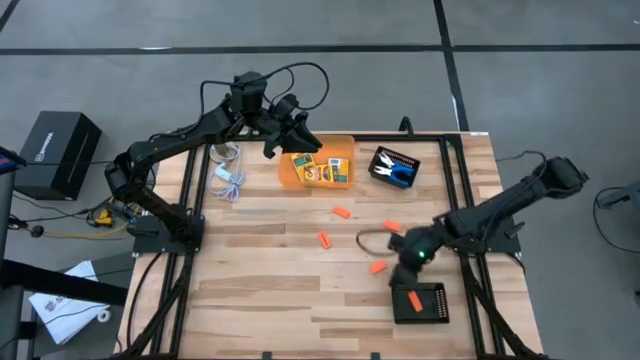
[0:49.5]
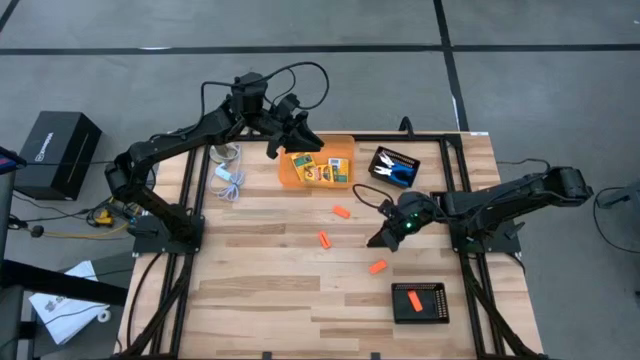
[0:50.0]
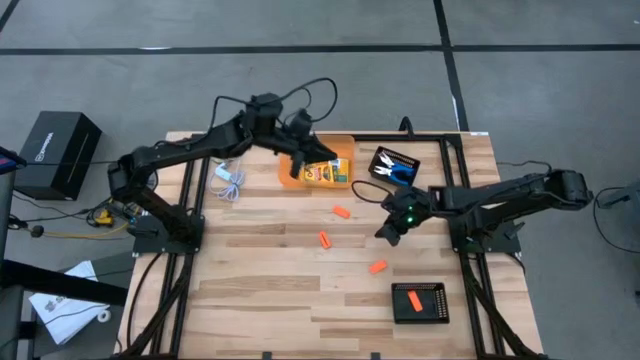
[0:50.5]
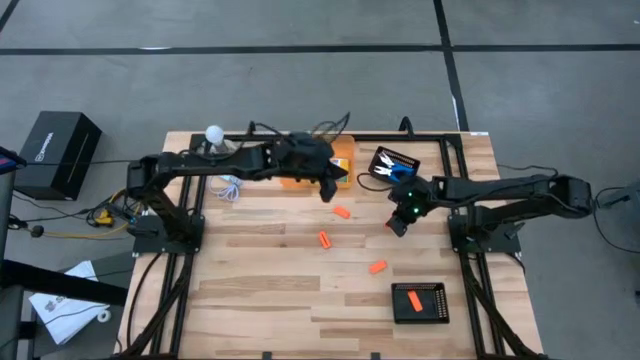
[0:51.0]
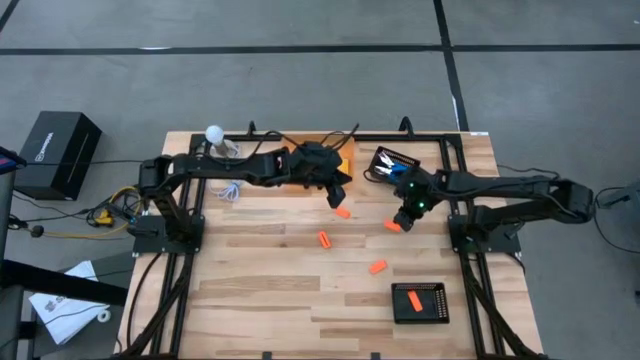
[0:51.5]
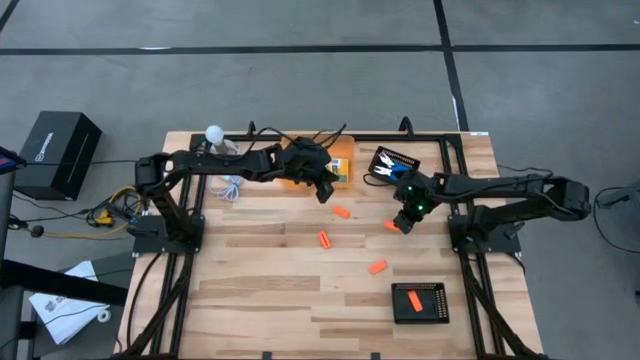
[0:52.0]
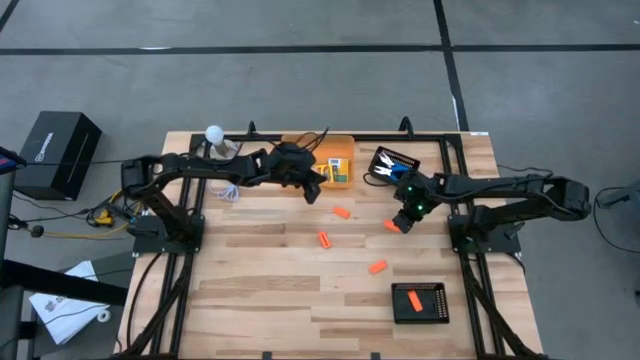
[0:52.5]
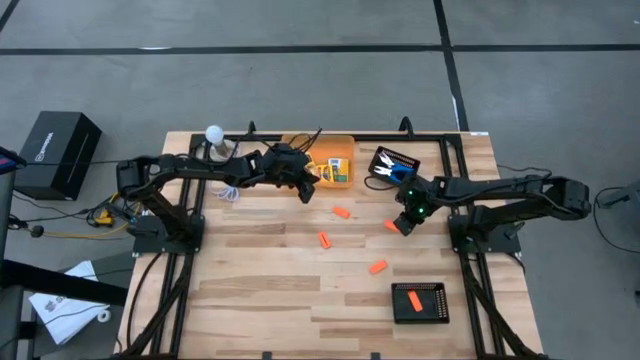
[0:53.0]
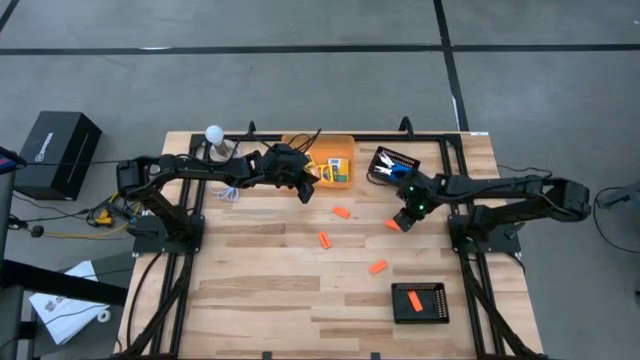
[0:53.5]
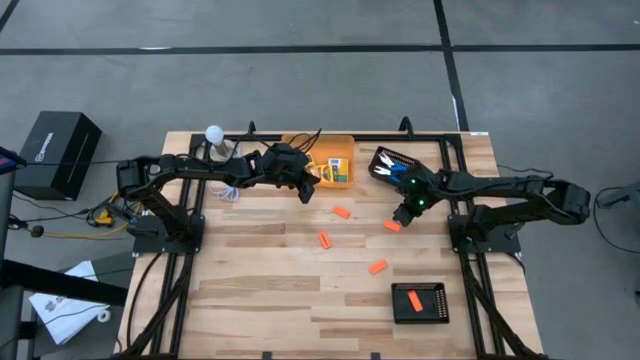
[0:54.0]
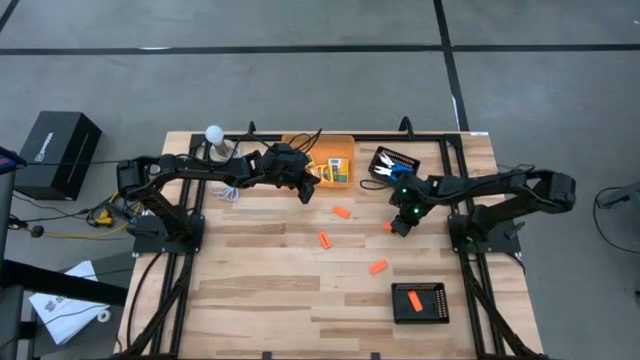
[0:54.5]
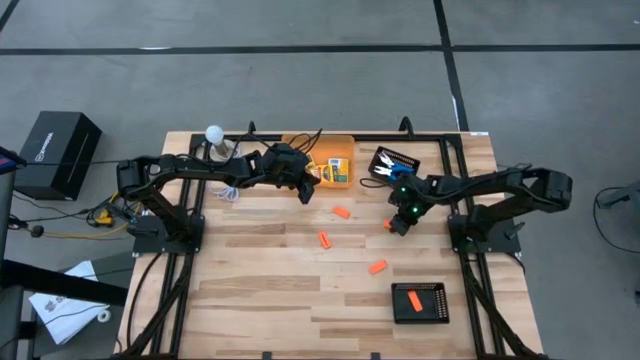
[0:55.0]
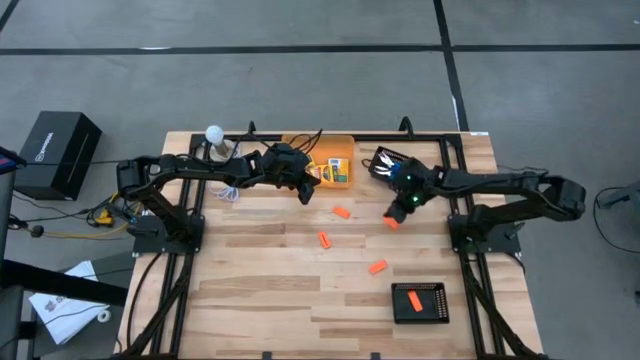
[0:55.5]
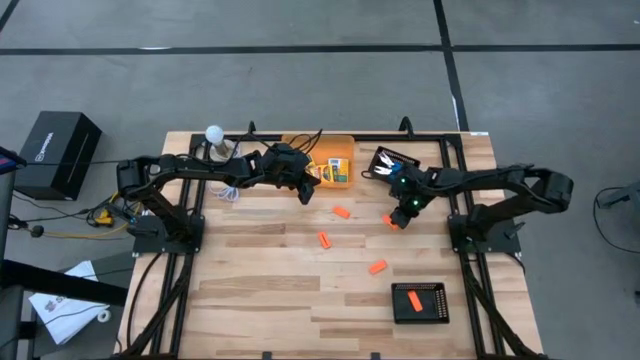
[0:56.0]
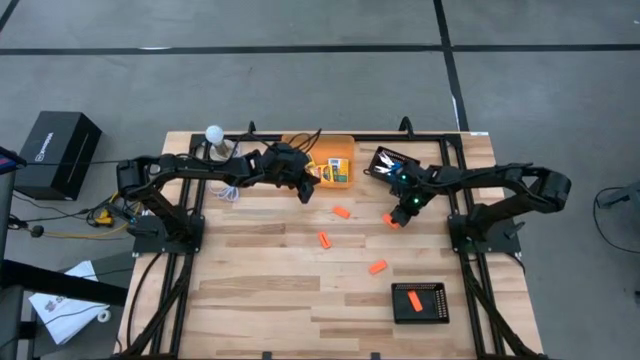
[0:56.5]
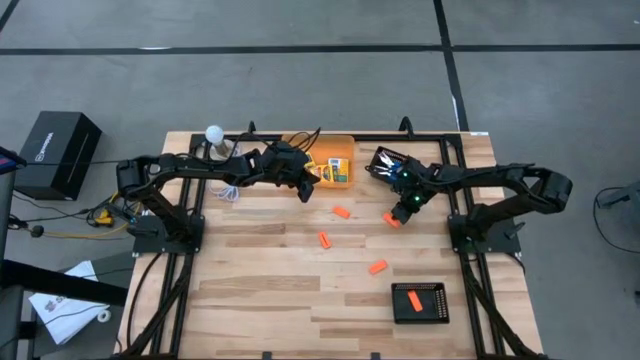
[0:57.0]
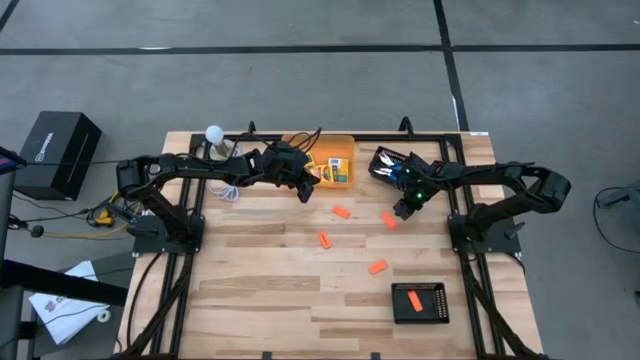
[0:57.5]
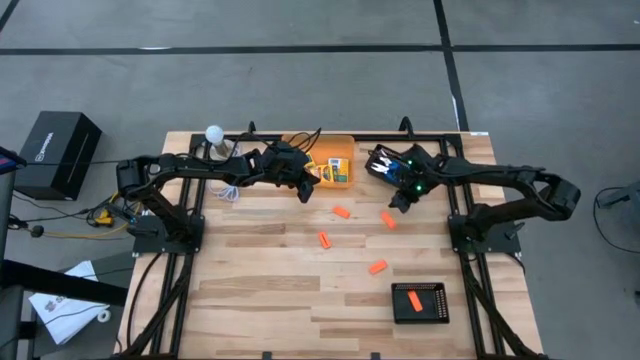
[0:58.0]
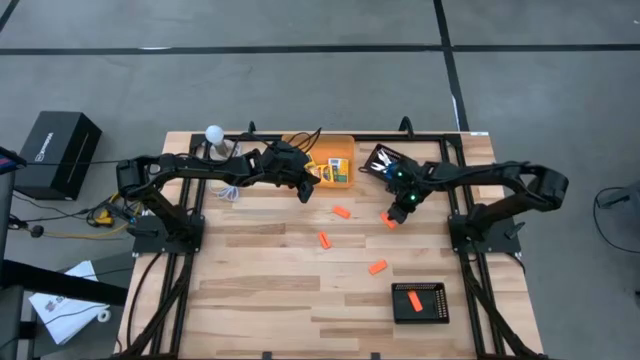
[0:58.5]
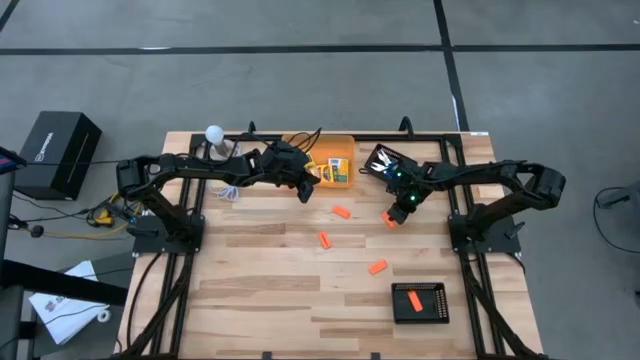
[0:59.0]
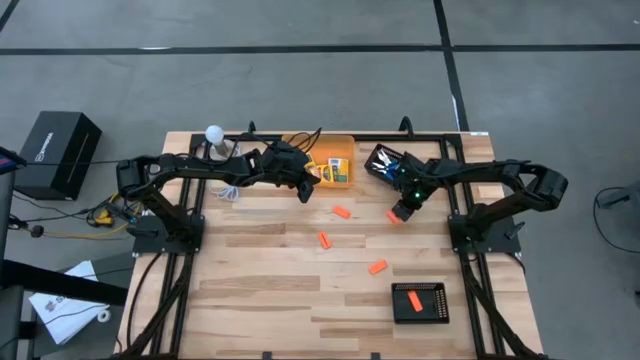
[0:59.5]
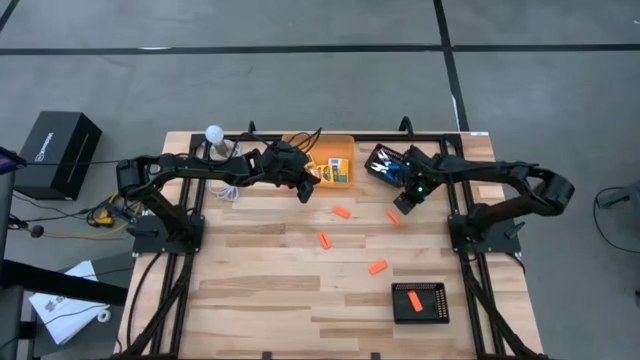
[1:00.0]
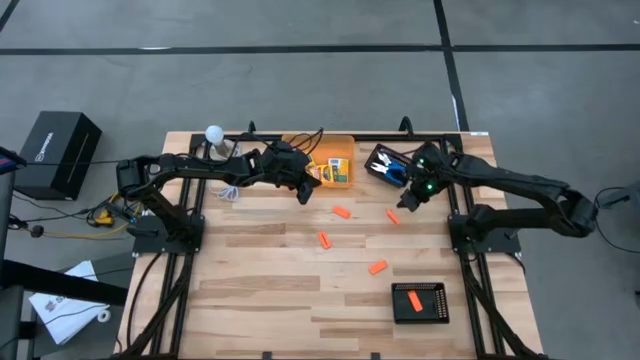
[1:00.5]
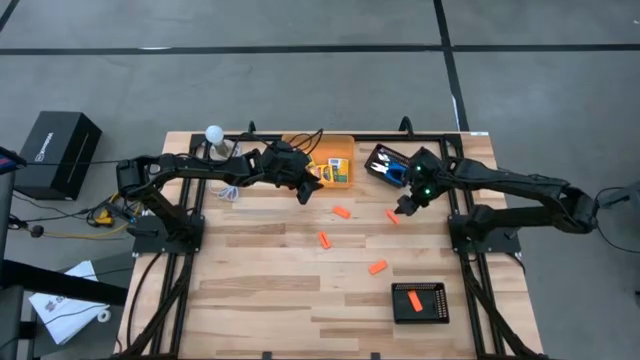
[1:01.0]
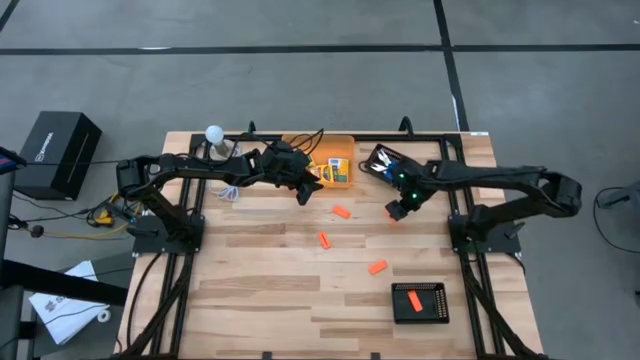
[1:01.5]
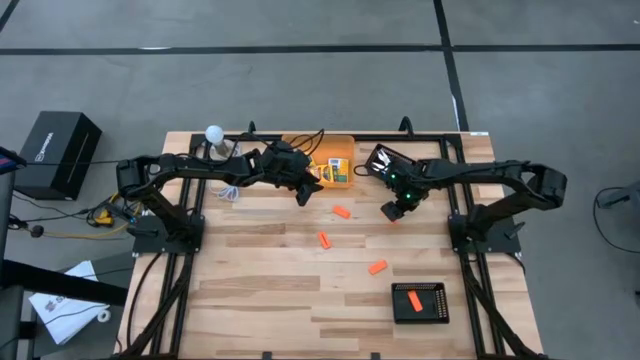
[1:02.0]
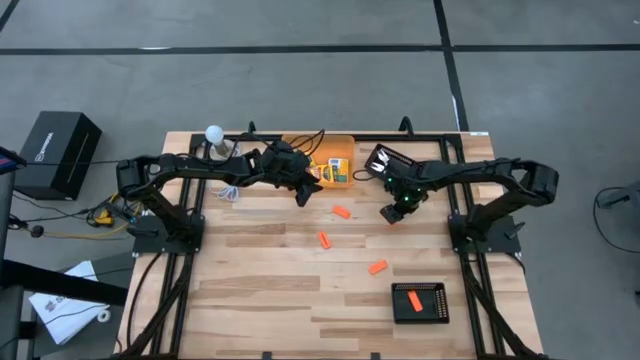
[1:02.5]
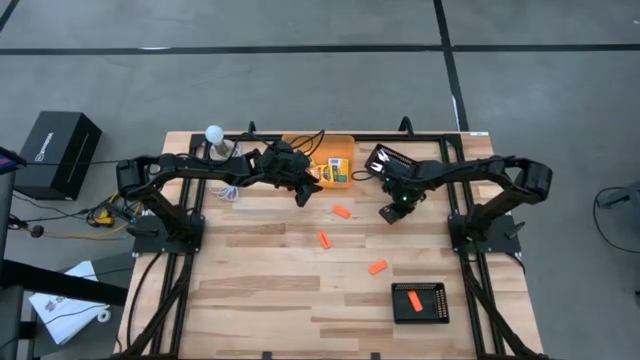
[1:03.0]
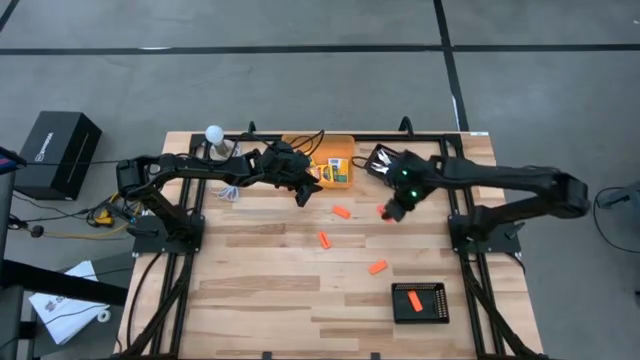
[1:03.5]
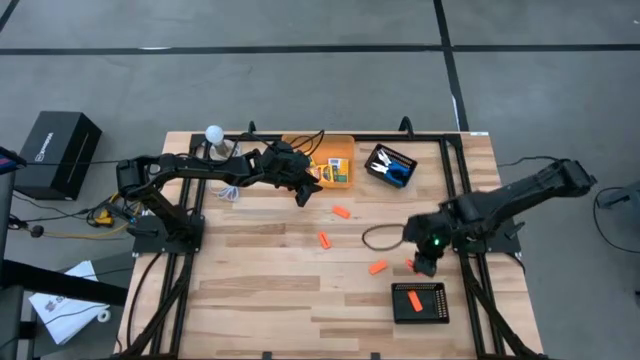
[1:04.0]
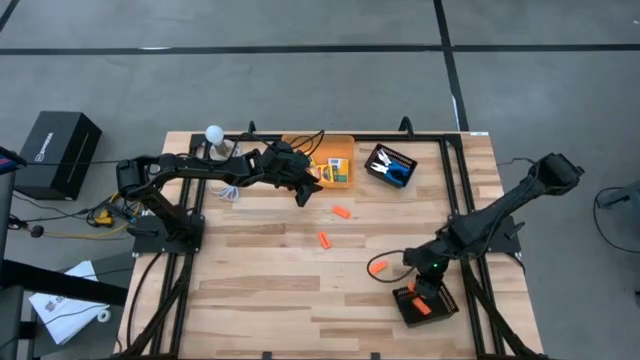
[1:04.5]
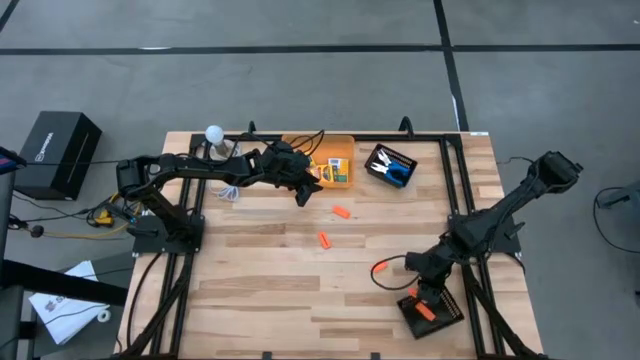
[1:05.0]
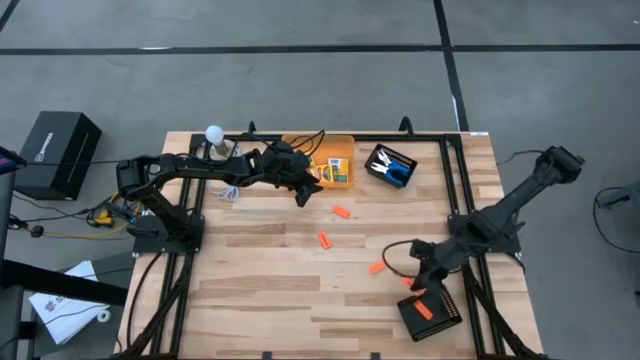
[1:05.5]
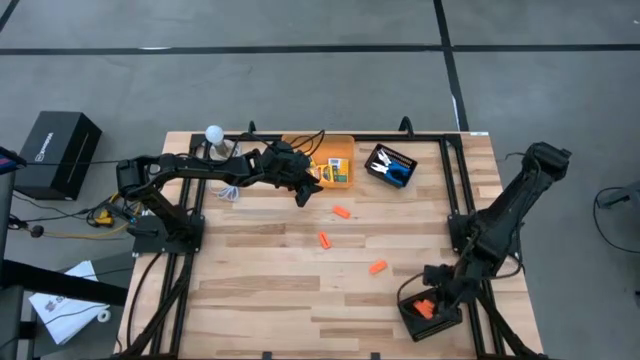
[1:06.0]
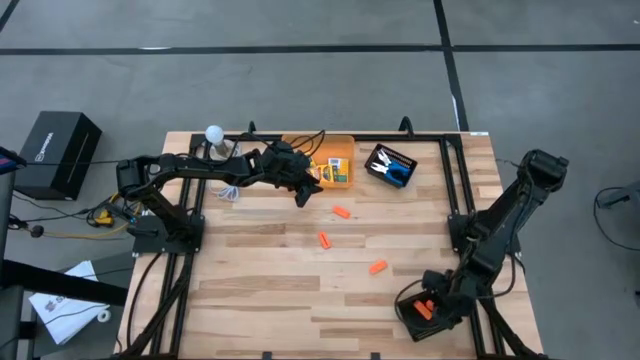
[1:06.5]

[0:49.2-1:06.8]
Task: Pick & Place School Supplies
Put the orange eraser into the bottom black bin

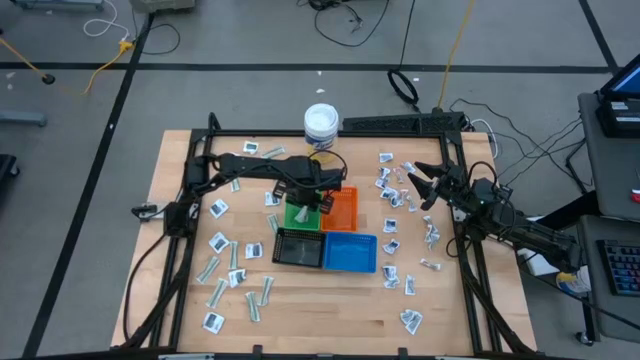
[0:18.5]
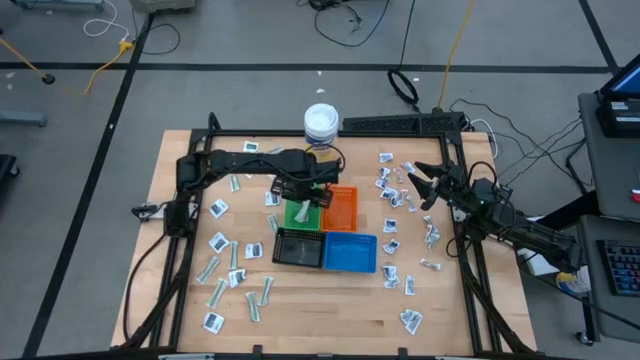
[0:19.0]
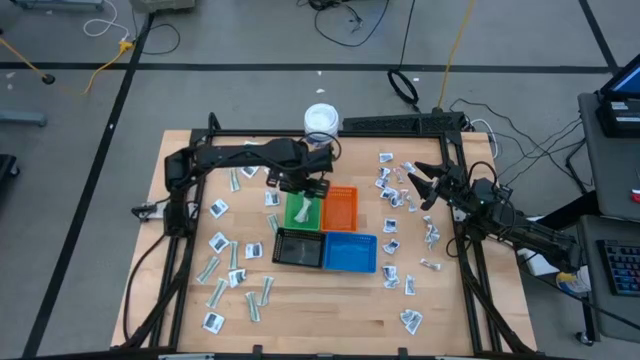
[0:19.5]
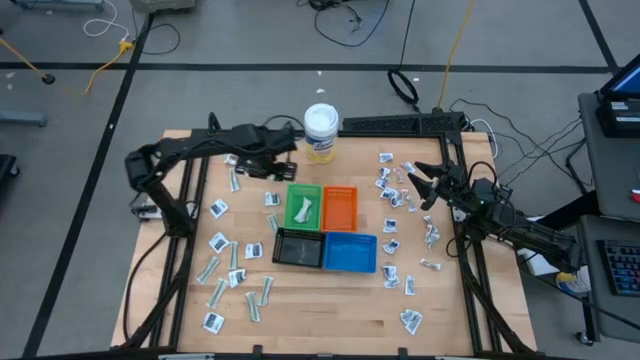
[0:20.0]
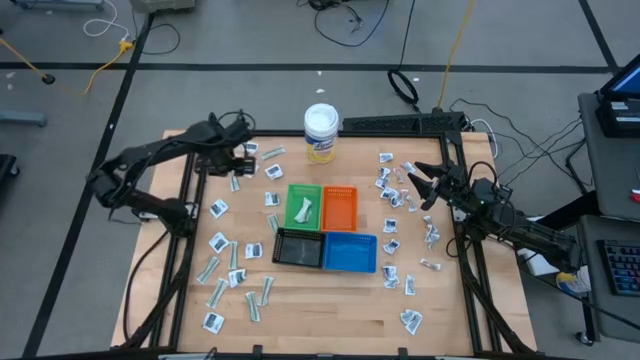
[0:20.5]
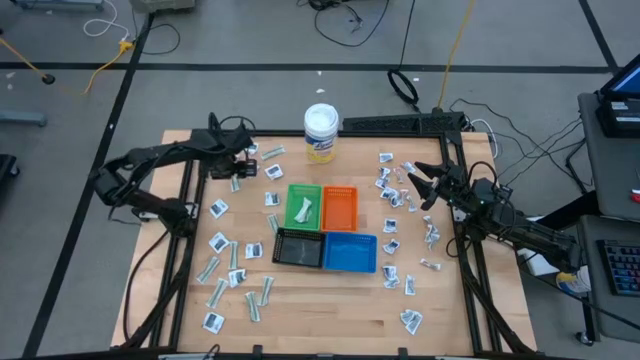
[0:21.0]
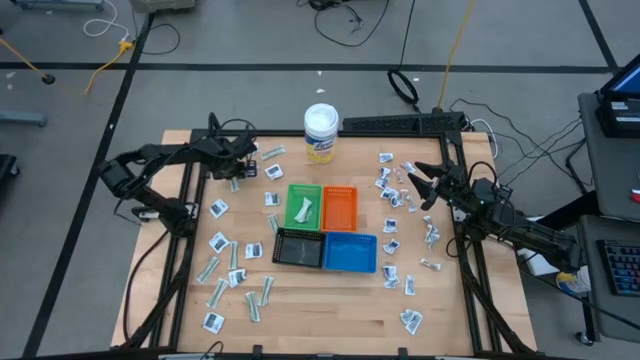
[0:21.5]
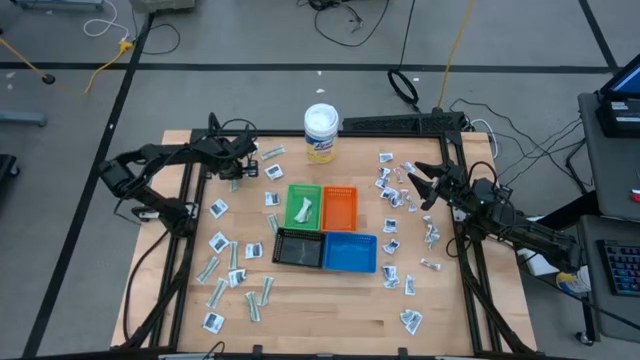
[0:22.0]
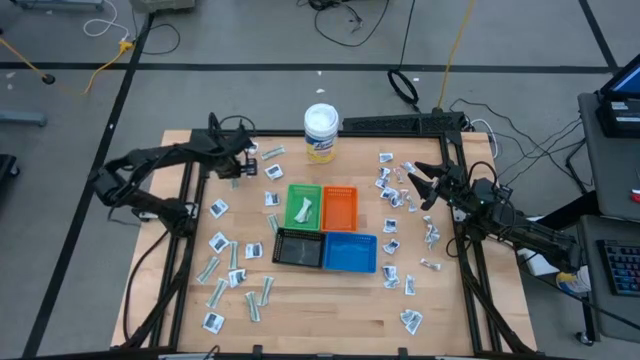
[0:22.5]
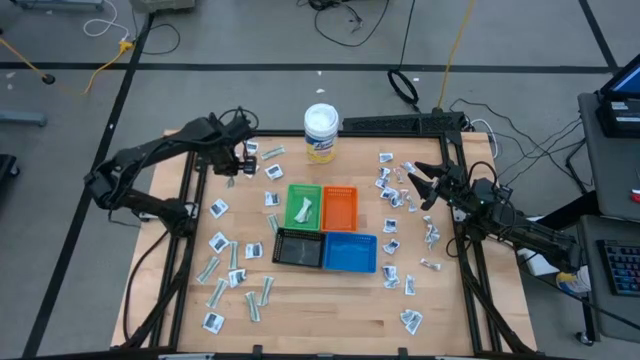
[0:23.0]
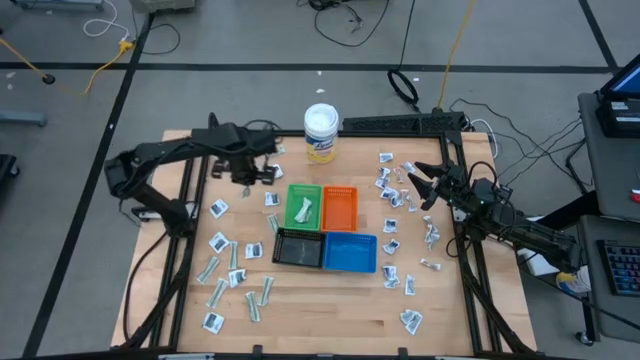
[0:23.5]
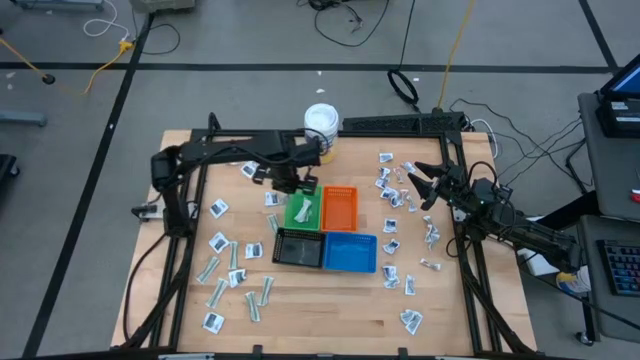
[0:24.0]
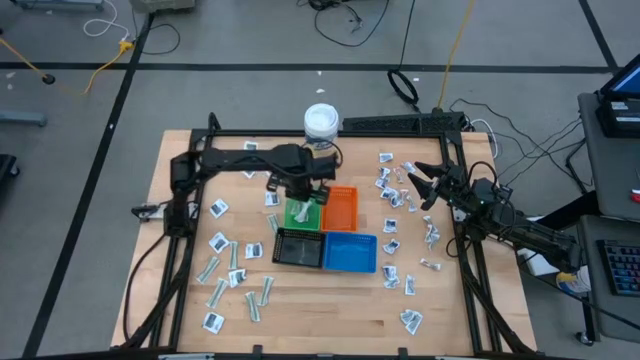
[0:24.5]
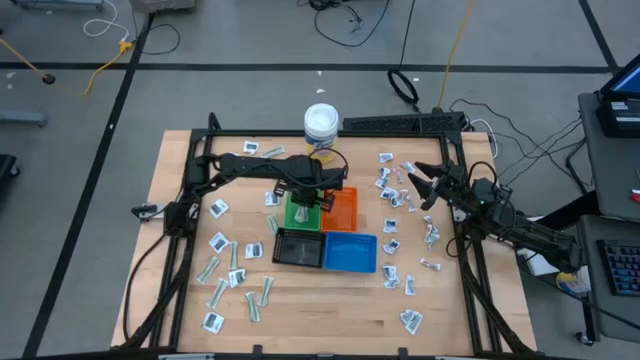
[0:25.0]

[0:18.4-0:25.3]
Task: Pick & Place First Aid Supplies
Put the bandage pack into the green bin
